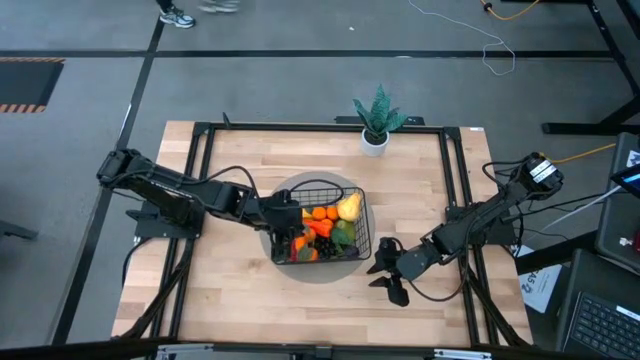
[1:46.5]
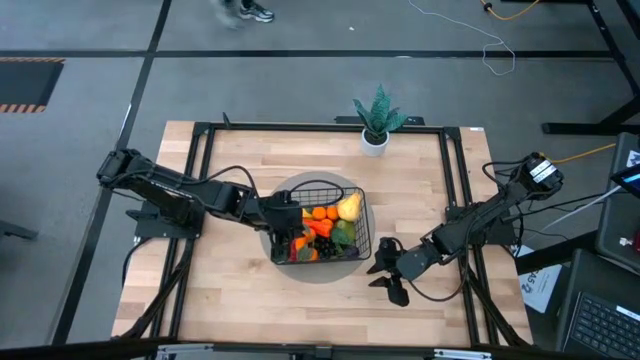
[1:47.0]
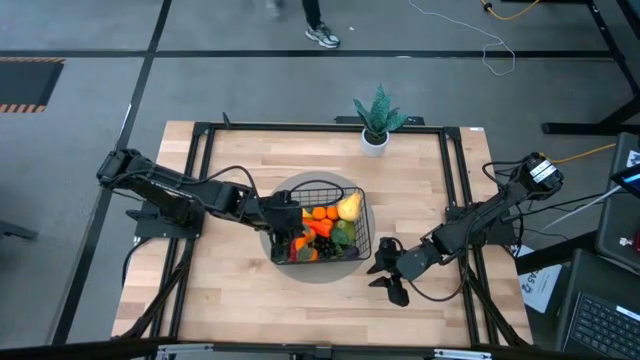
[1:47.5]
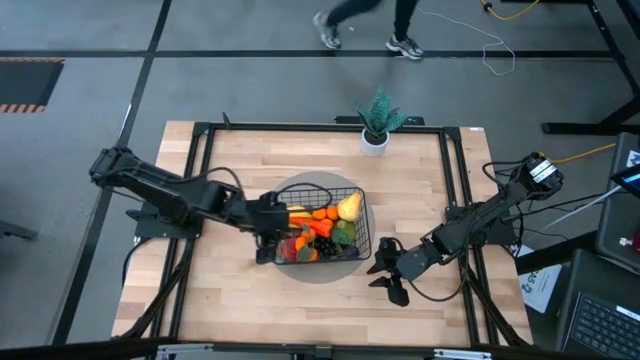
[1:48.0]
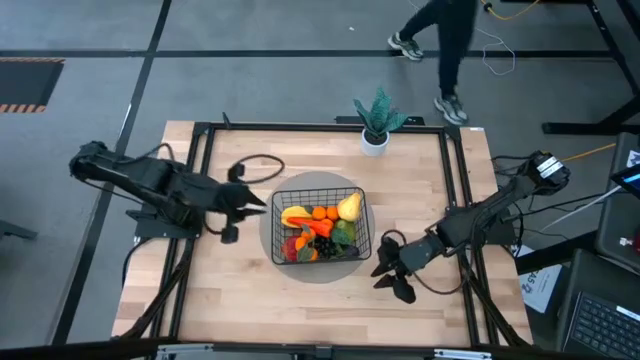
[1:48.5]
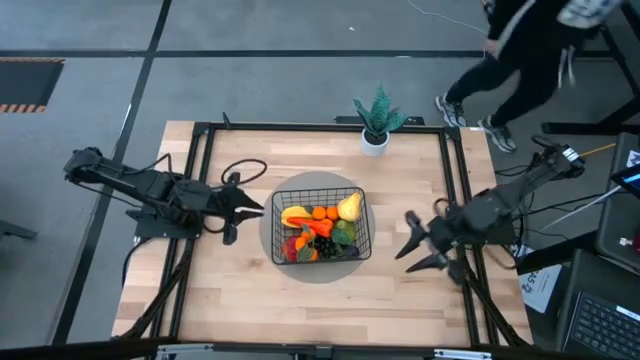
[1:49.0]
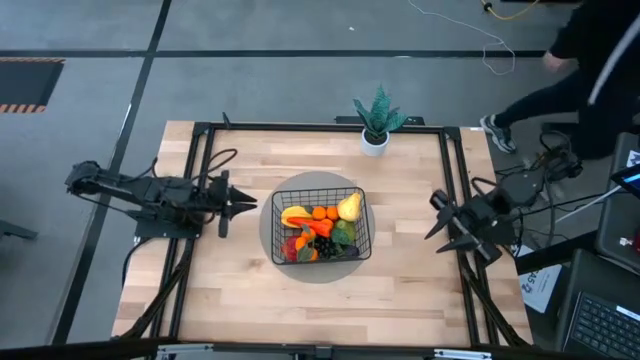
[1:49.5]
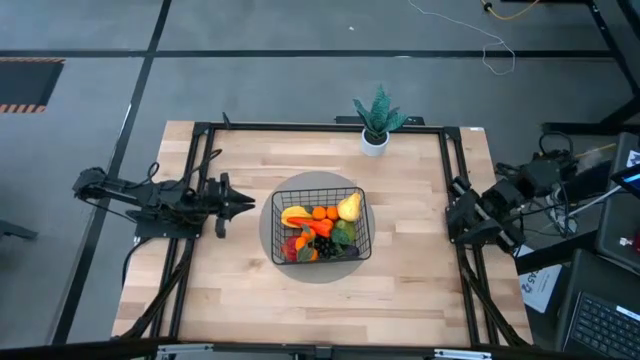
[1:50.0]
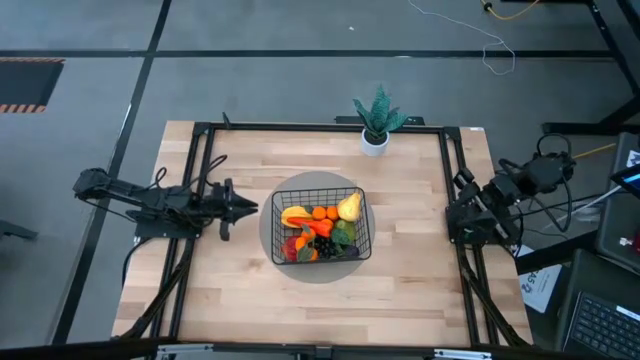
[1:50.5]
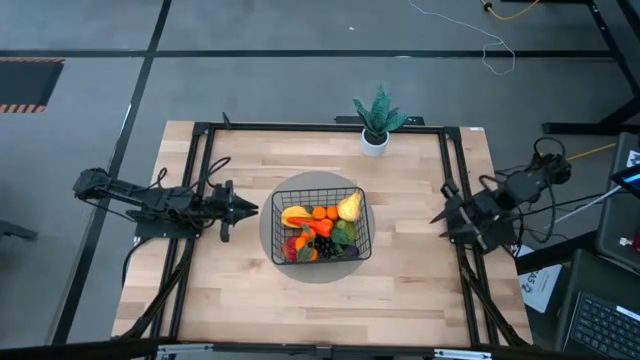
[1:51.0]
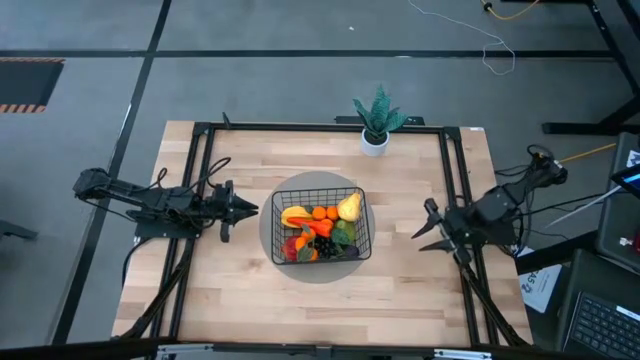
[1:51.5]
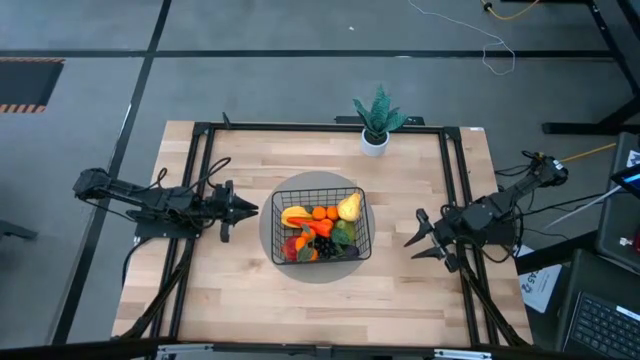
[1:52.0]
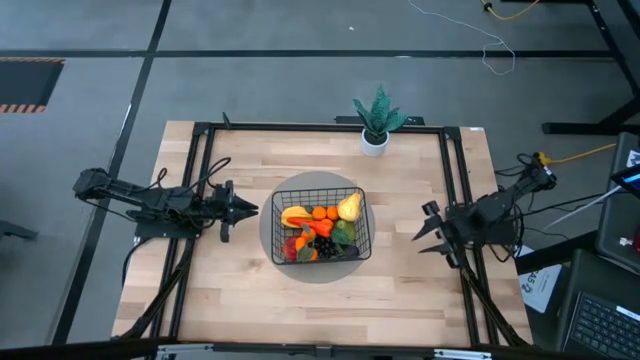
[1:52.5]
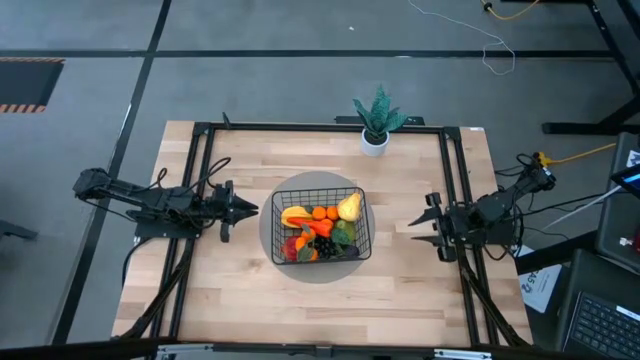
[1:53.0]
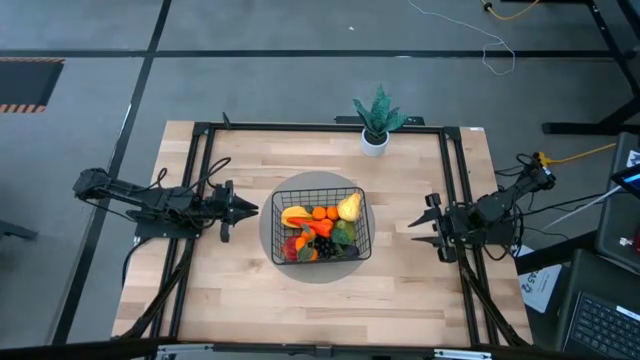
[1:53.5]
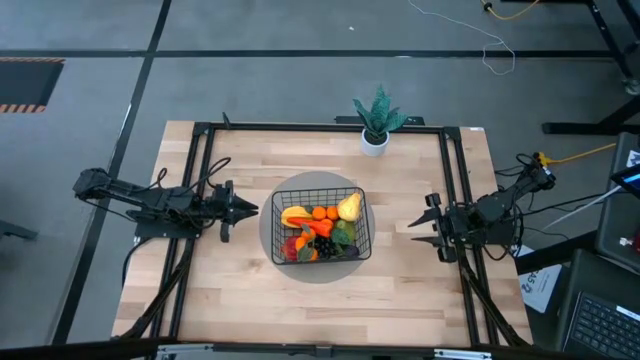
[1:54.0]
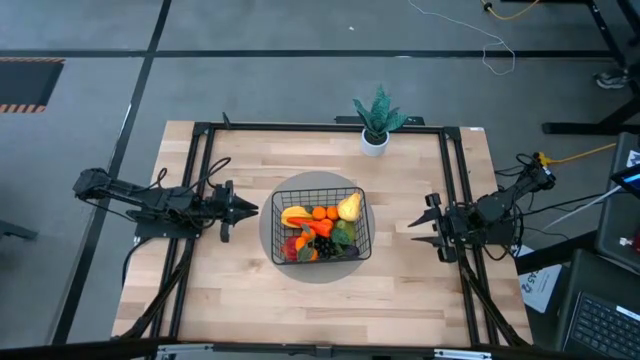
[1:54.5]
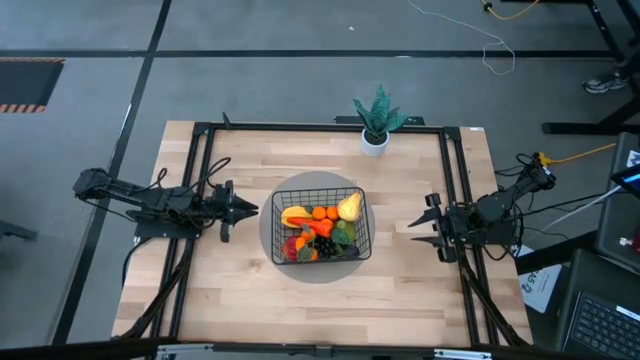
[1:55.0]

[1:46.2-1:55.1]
Task: Build produce basket
Return to Home Position

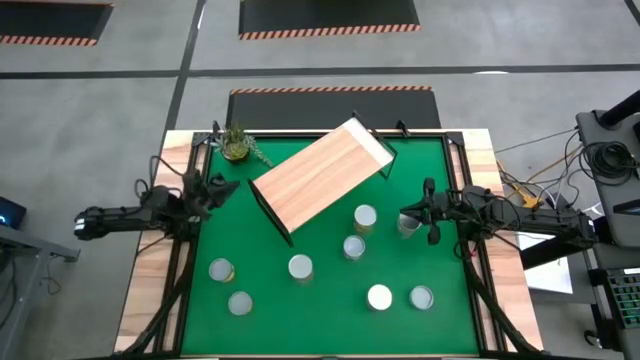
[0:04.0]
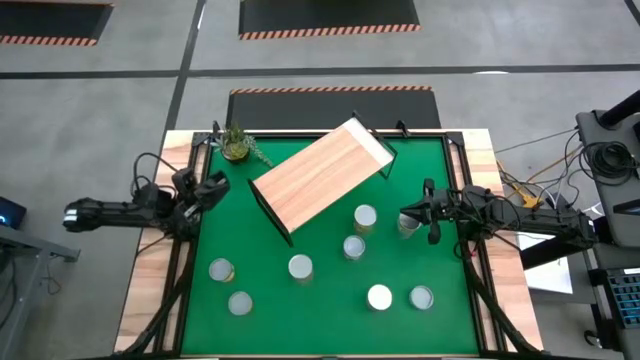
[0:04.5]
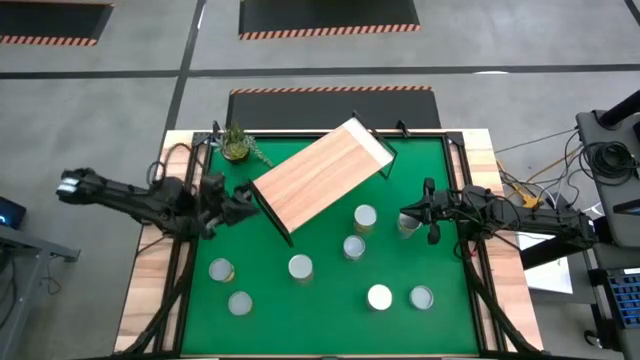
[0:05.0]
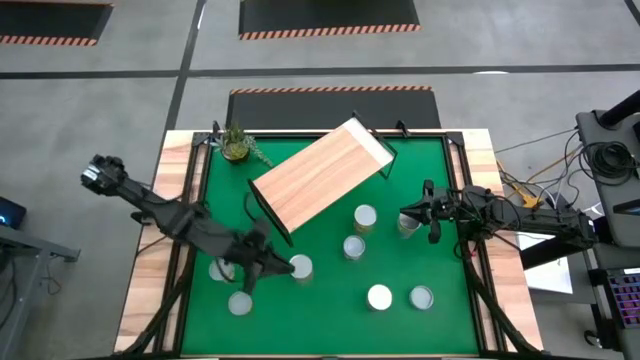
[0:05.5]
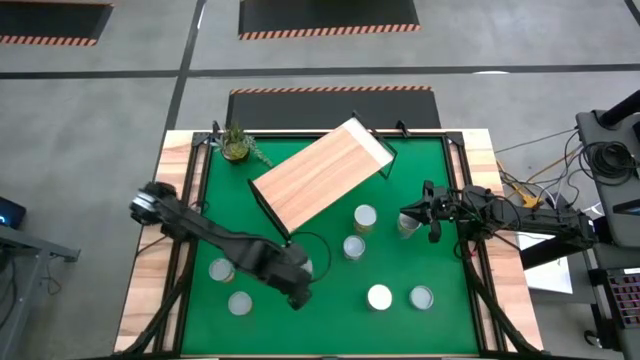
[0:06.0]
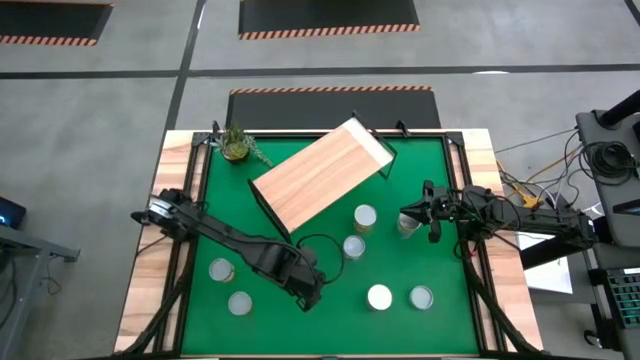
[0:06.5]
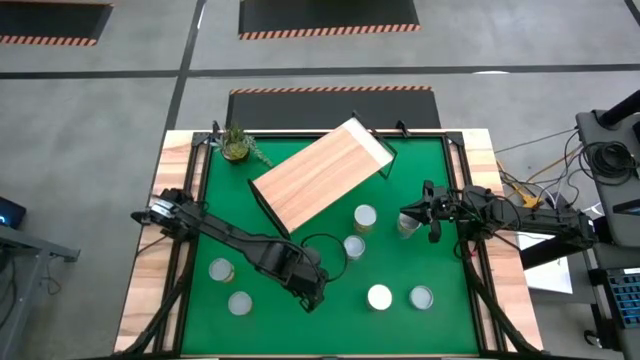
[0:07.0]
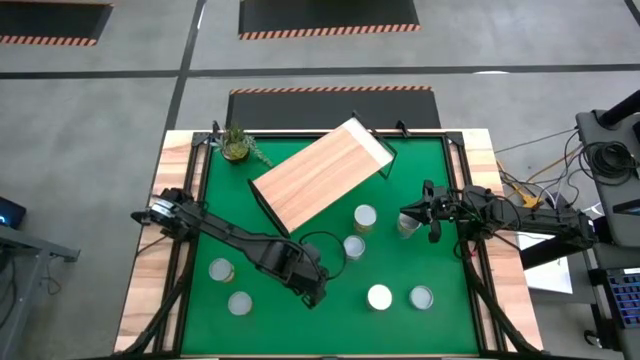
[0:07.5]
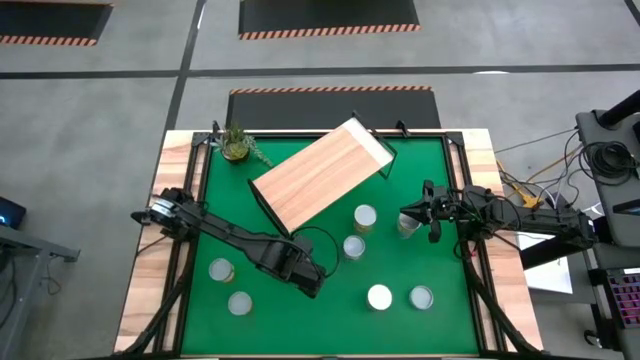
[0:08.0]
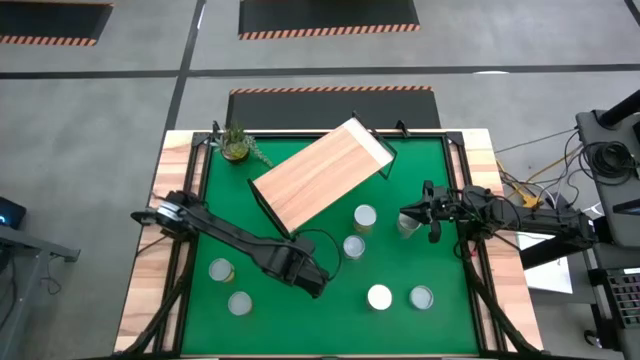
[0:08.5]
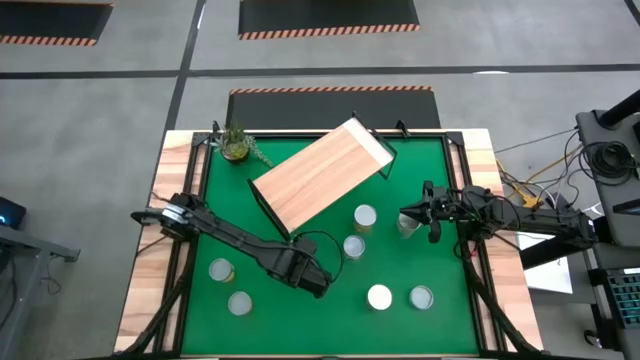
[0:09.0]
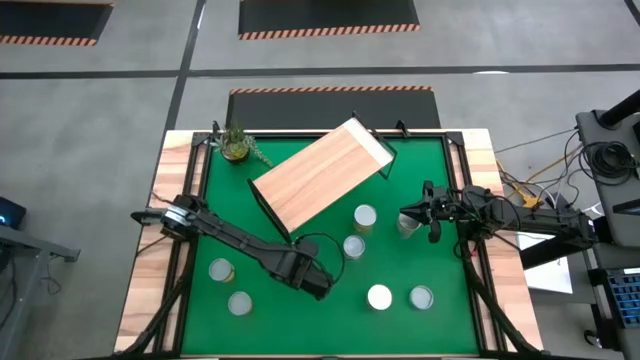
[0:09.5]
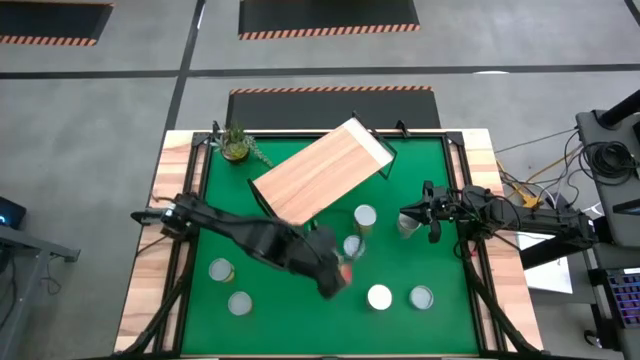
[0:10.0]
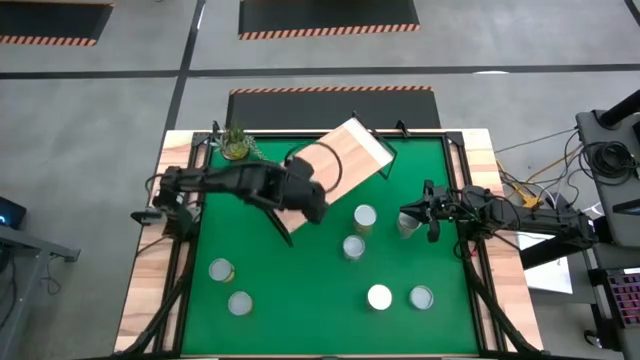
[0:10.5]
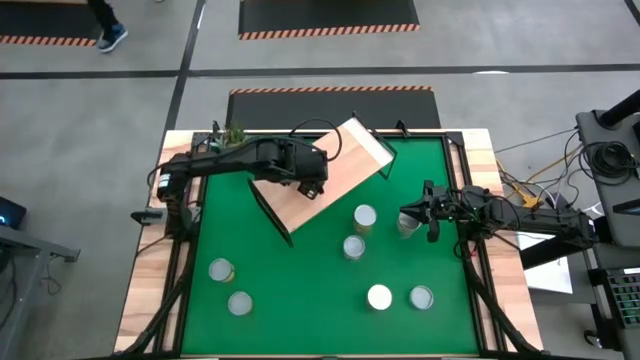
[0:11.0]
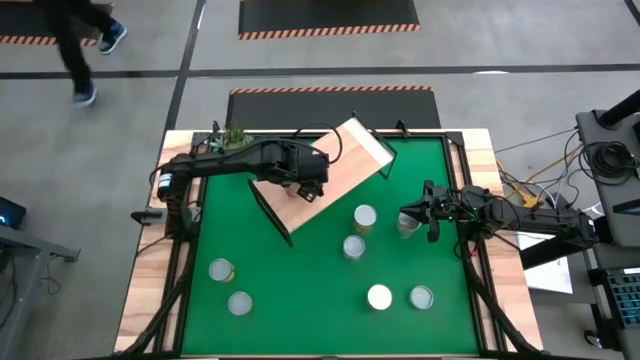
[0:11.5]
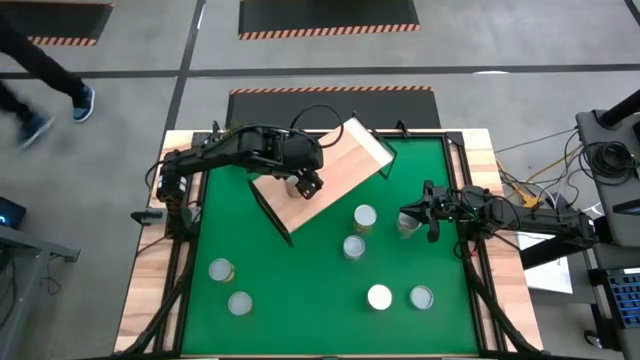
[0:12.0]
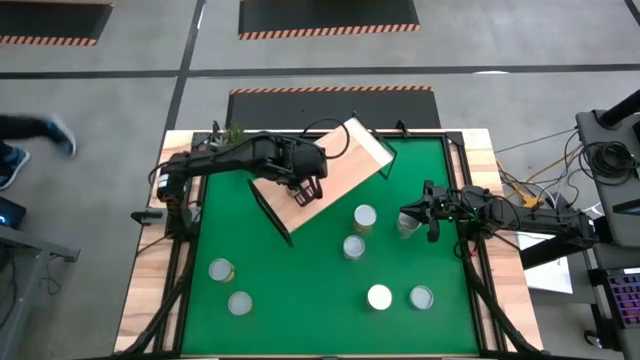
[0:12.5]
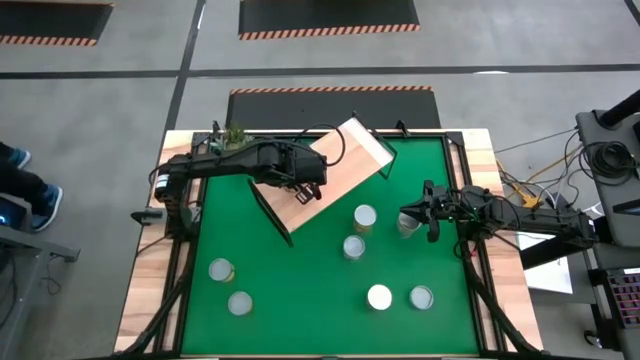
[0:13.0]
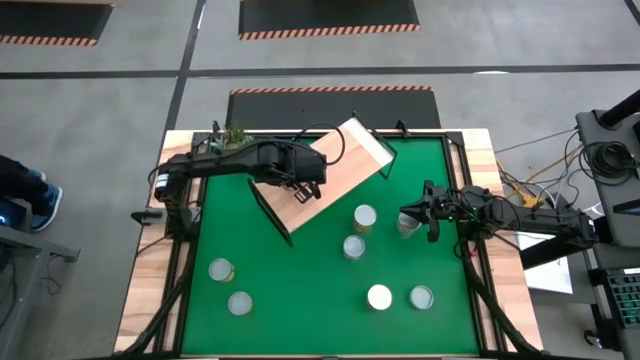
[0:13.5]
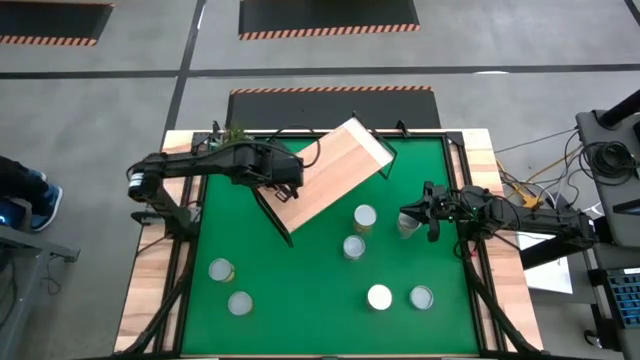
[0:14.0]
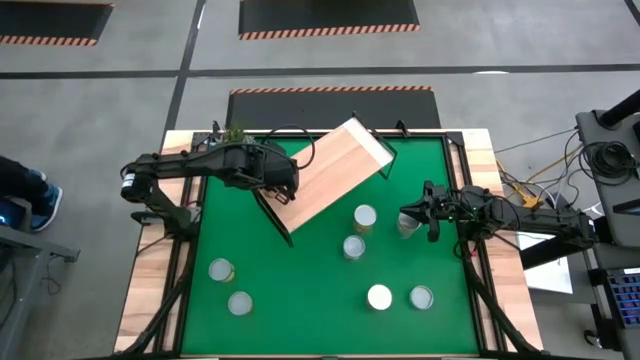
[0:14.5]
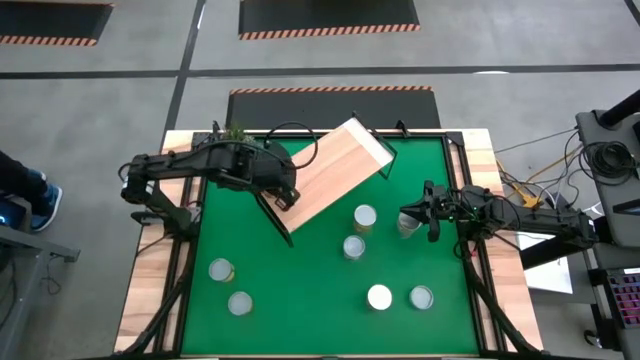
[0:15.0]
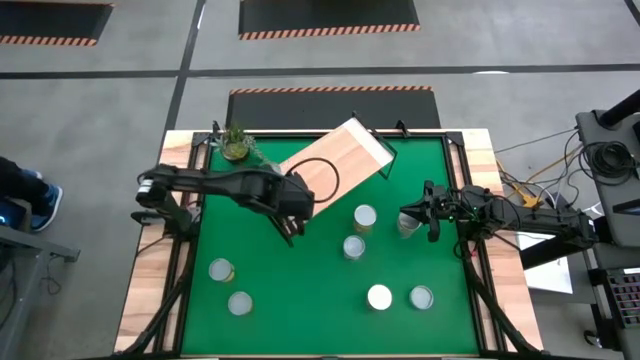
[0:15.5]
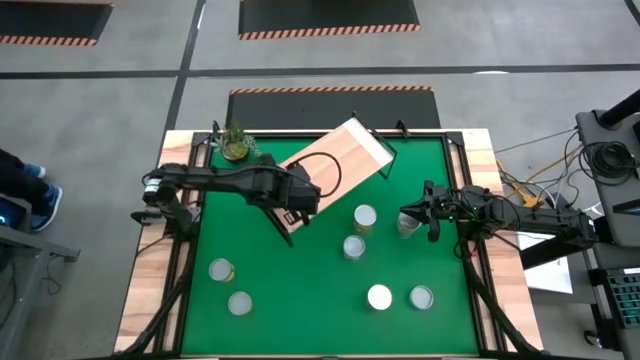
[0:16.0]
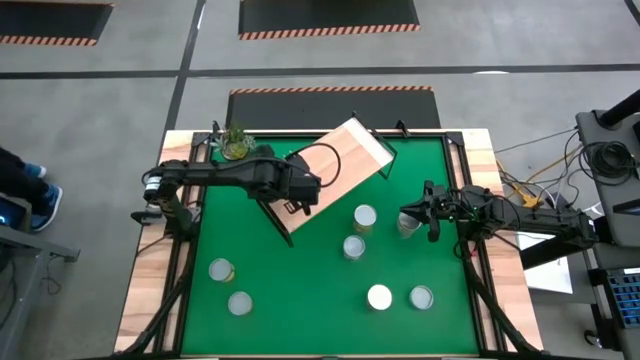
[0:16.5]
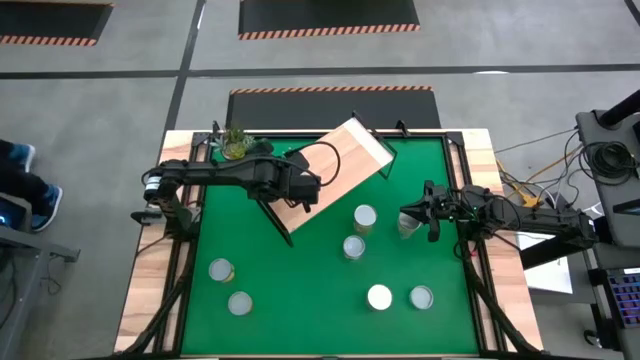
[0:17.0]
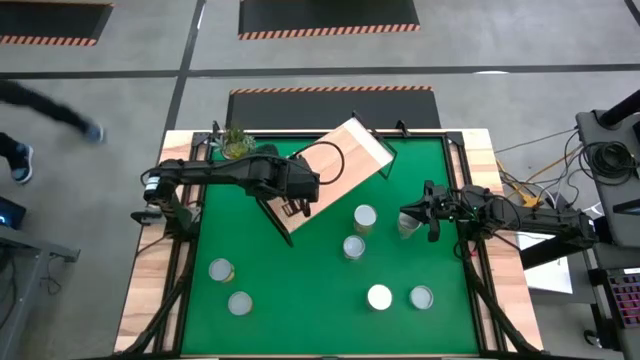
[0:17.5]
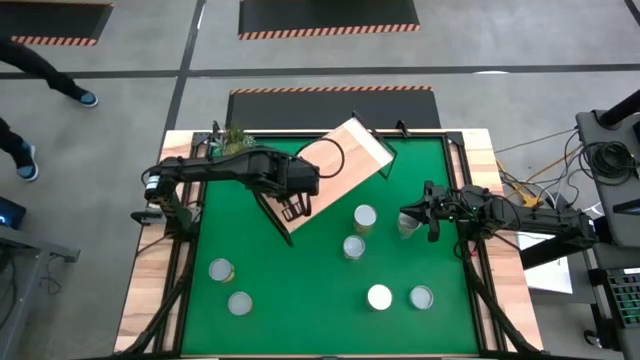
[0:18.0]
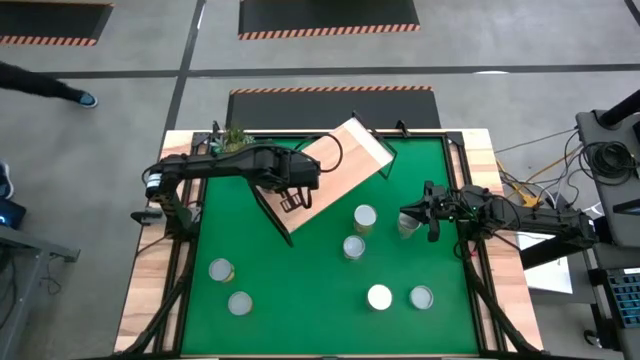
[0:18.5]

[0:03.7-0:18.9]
Task: Pick and place cans onto a shelf
Put the orange and yellow can on the shelf
